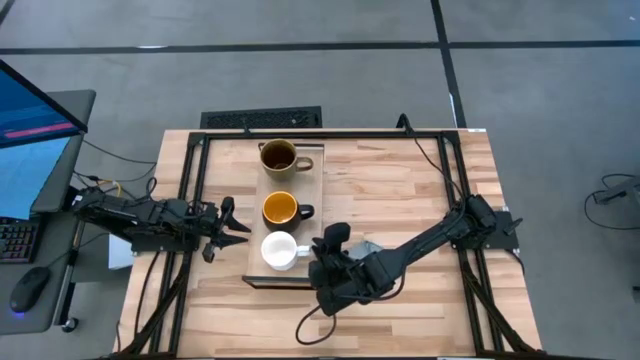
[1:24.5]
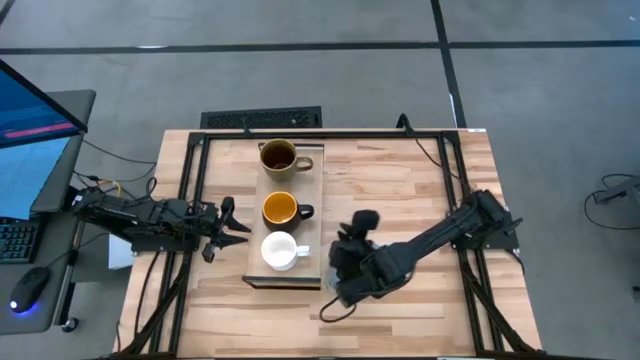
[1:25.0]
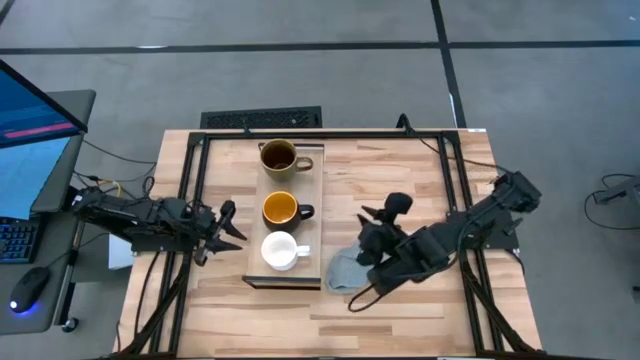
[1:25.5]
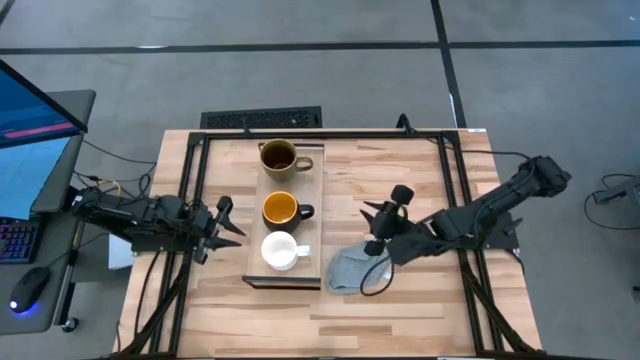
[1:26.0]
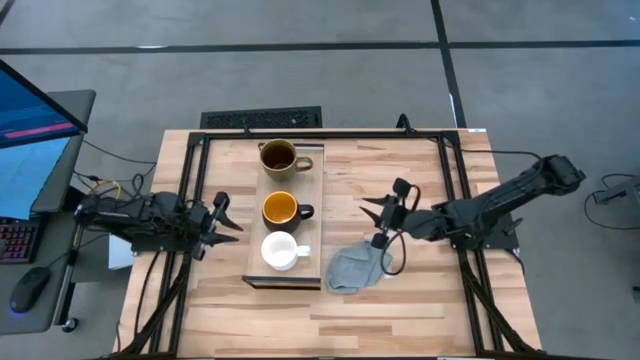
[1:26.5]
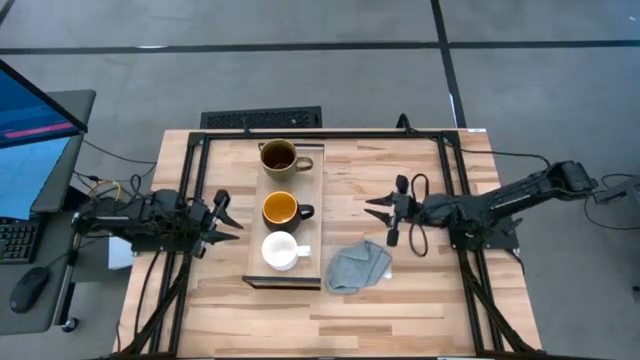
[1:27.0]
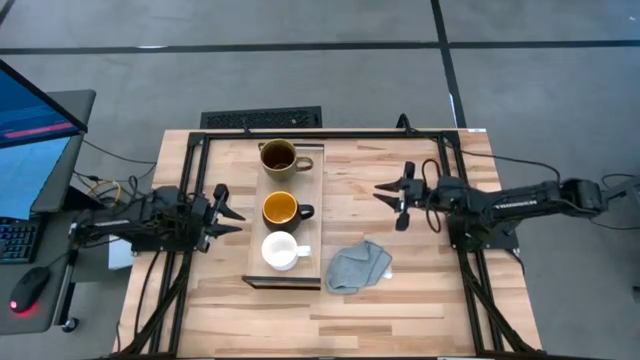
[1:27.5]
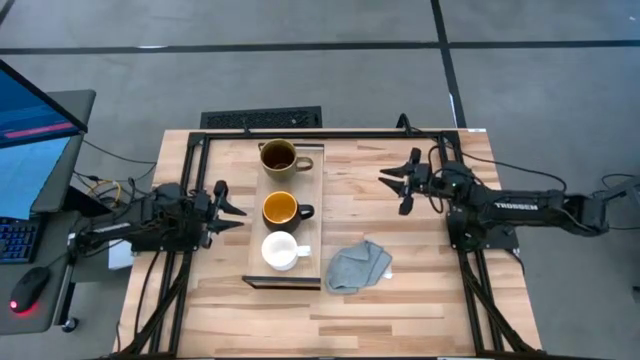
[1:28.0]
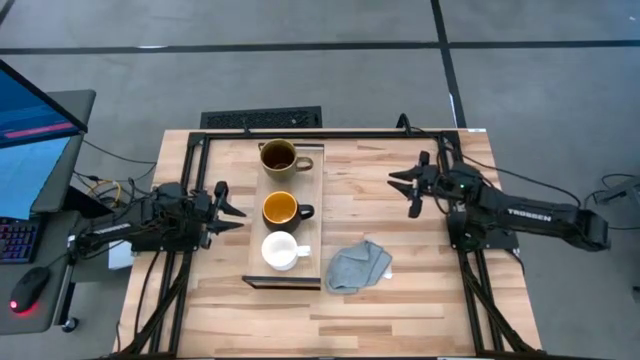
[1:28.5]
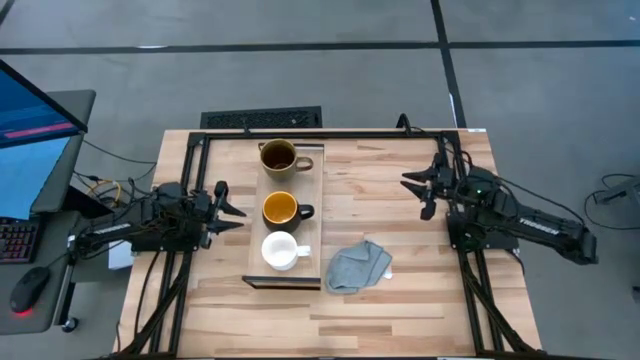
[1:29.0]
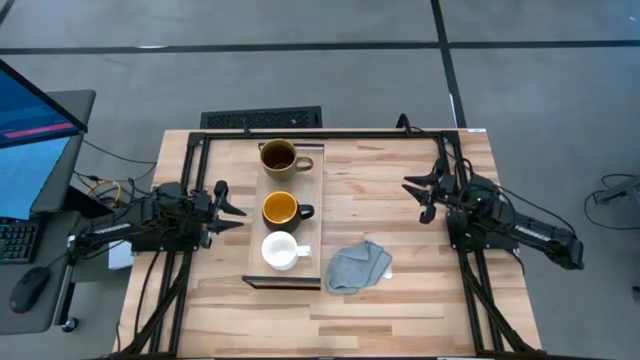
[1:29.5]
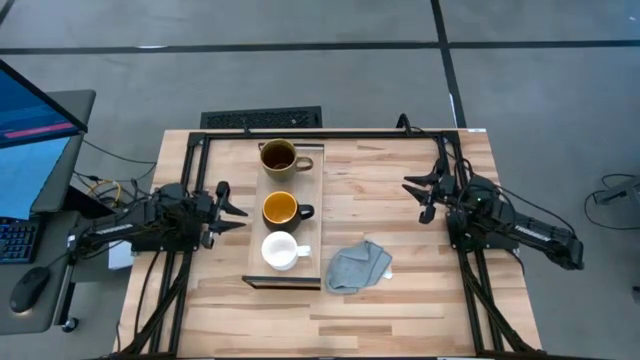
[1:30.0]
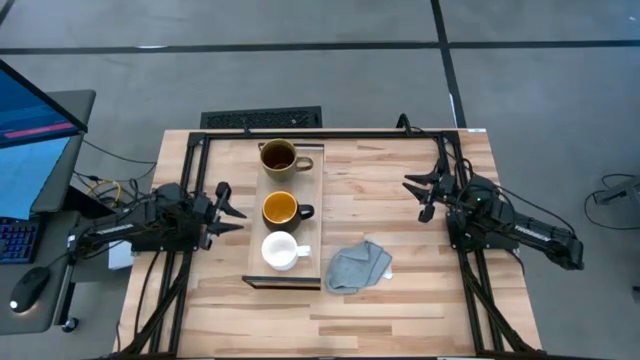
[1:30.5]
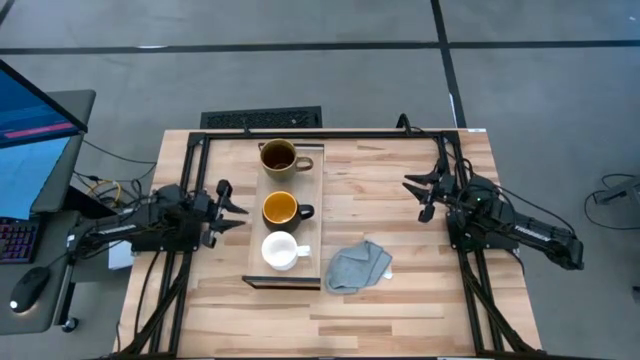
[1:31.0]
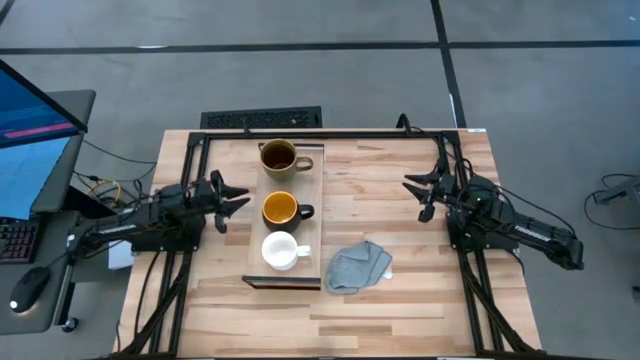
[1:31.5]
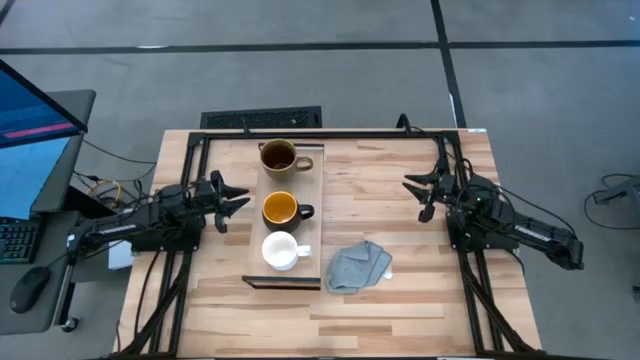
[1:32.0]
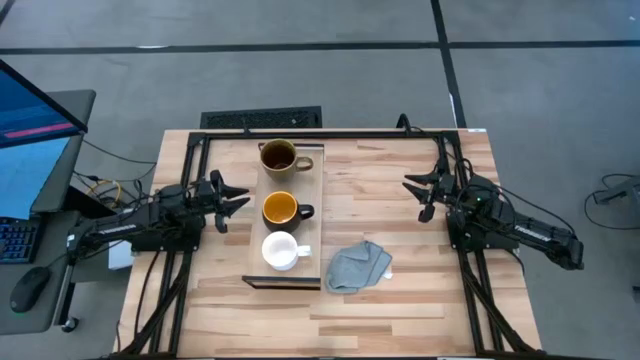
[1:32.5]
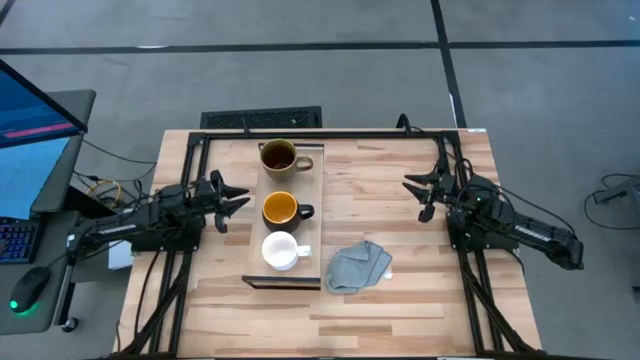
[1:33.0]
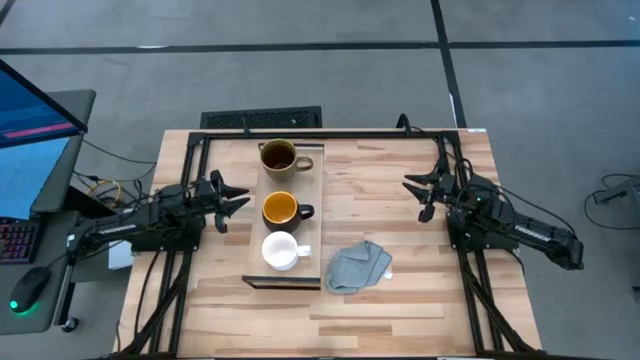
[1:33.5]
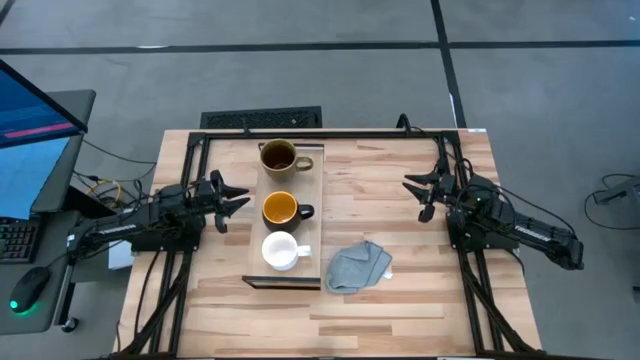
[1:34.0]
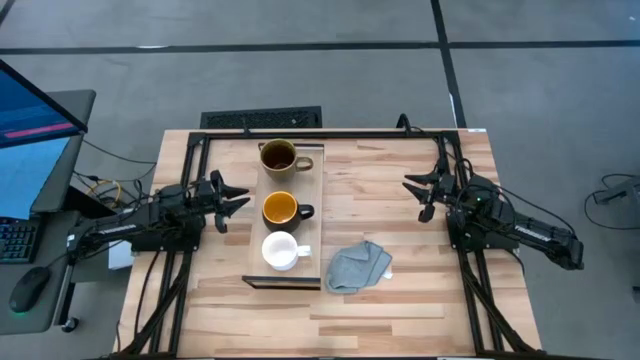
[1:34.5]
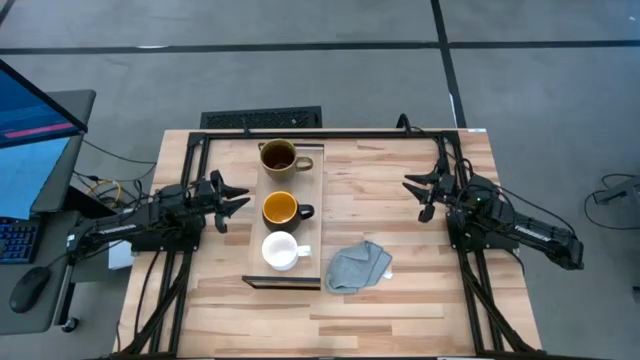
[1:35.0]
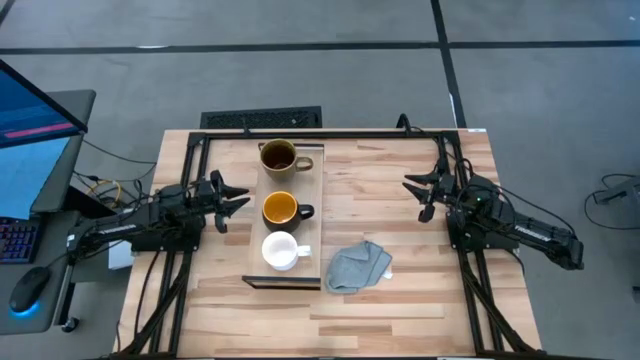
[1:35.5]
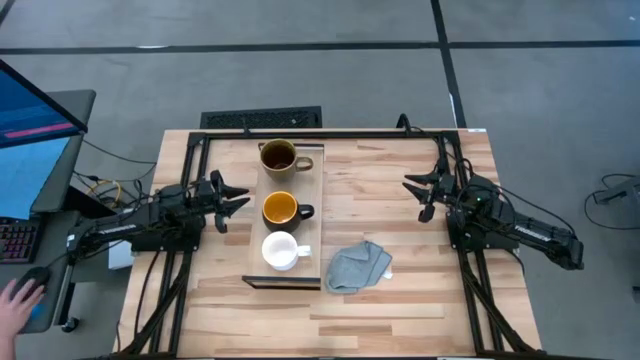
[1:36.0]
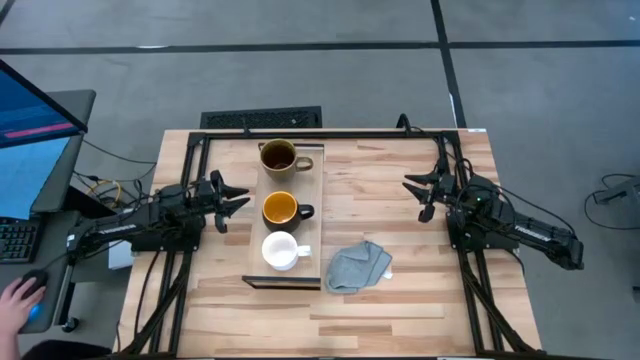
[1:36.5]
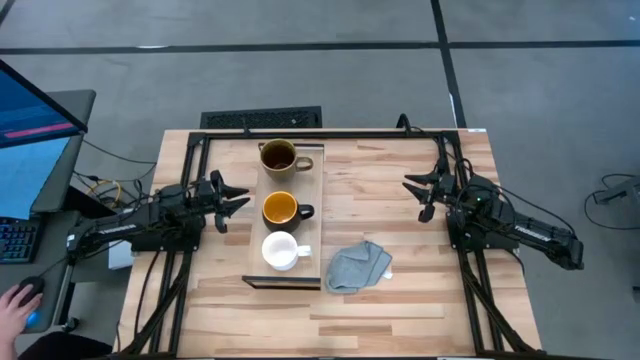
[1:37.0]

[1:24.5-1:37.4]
Task: Stack small to large cups/mugs on shelf
Return to Home Position
